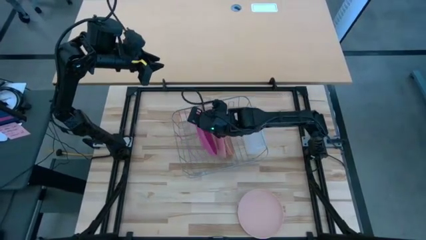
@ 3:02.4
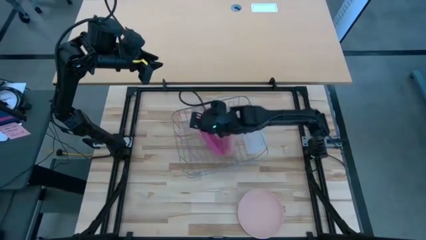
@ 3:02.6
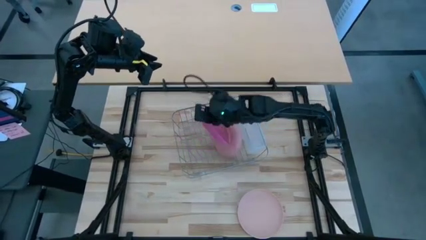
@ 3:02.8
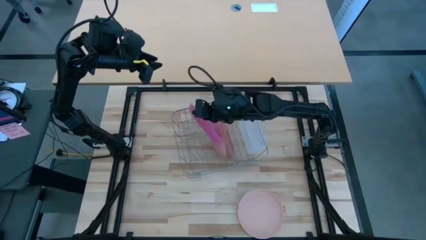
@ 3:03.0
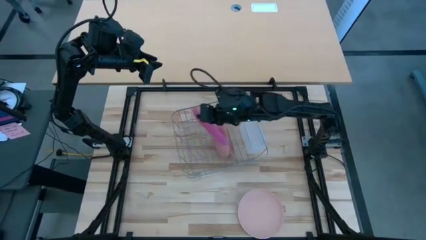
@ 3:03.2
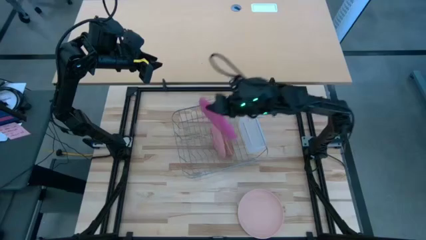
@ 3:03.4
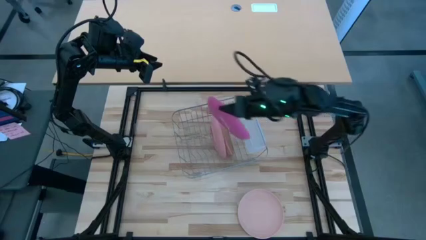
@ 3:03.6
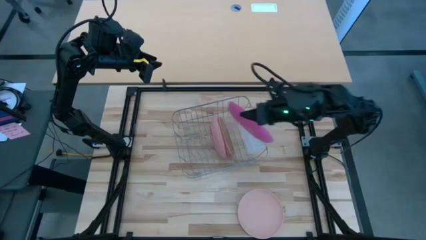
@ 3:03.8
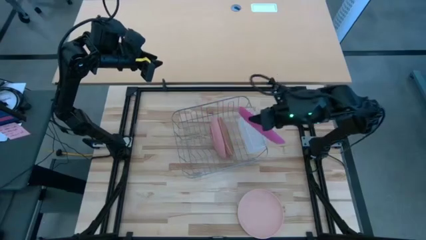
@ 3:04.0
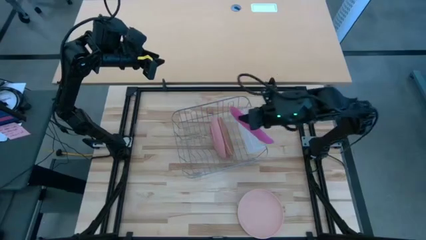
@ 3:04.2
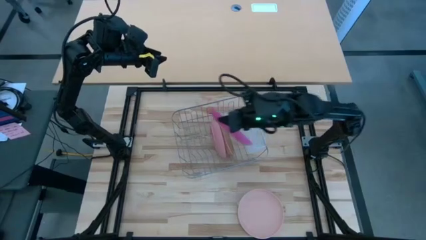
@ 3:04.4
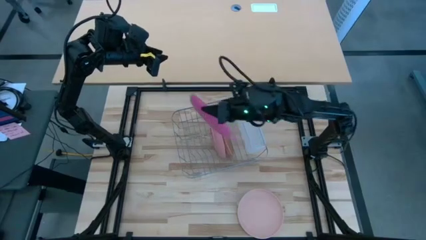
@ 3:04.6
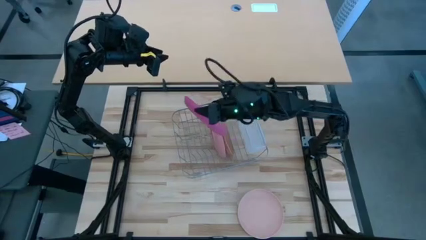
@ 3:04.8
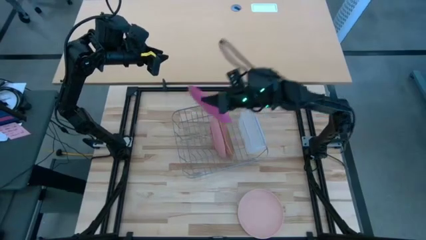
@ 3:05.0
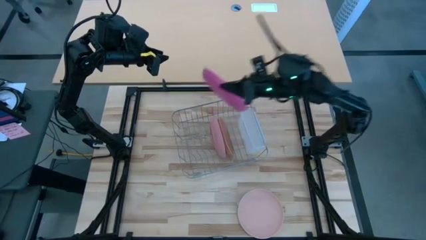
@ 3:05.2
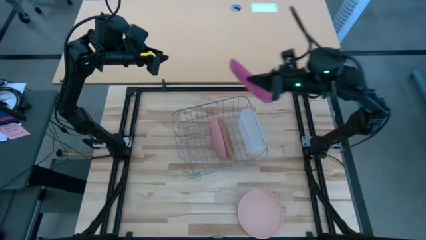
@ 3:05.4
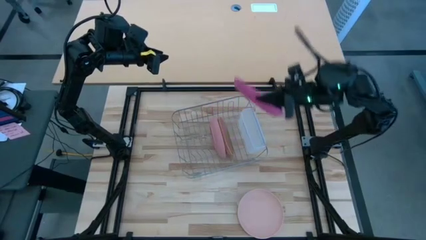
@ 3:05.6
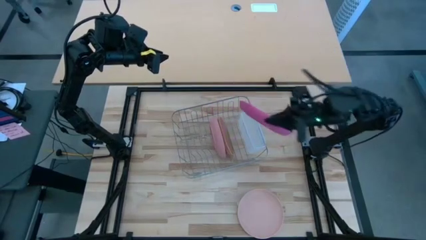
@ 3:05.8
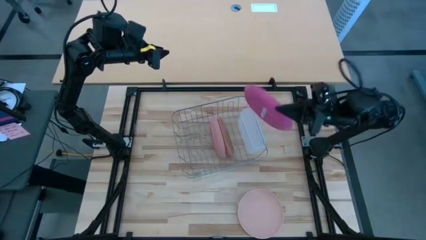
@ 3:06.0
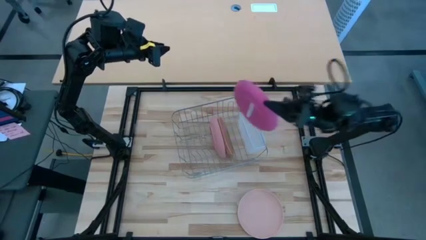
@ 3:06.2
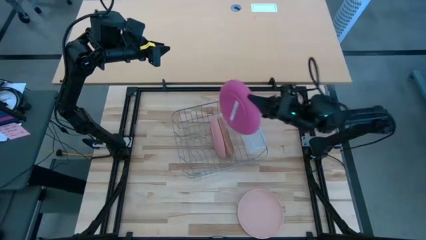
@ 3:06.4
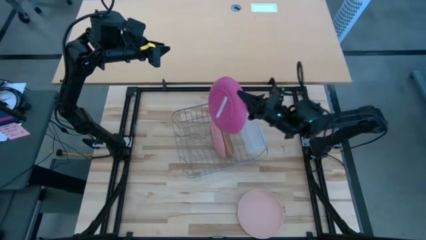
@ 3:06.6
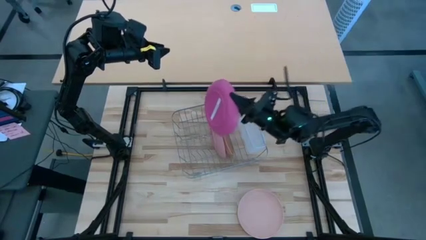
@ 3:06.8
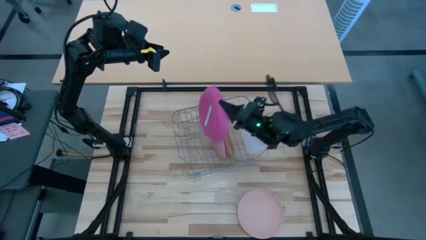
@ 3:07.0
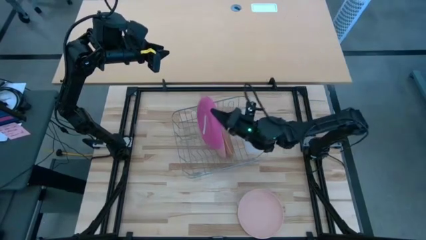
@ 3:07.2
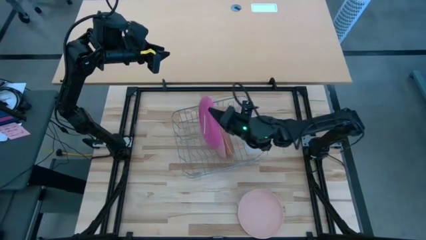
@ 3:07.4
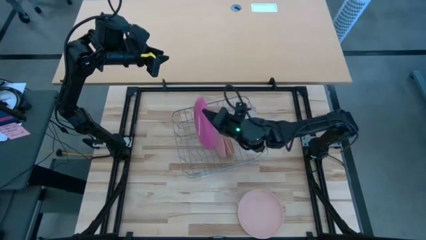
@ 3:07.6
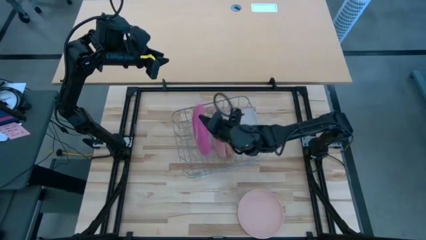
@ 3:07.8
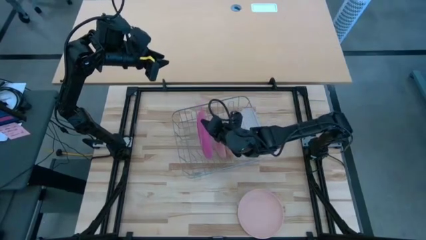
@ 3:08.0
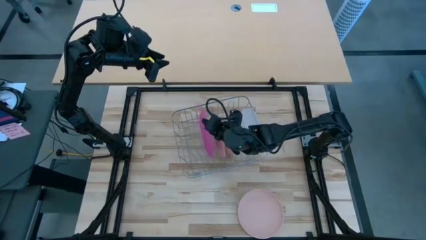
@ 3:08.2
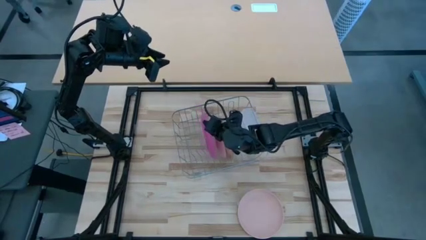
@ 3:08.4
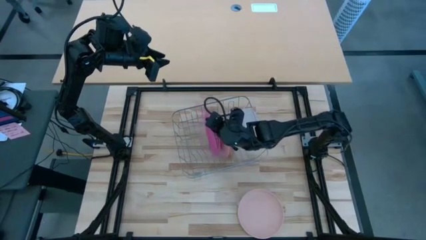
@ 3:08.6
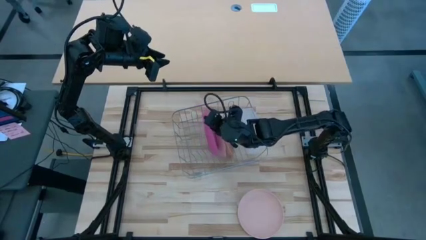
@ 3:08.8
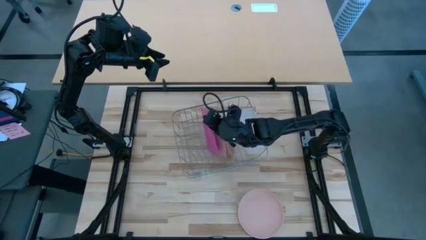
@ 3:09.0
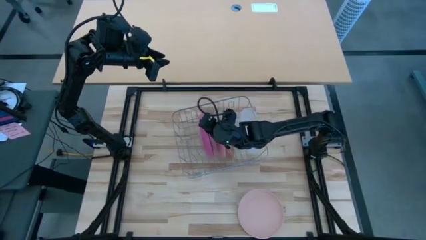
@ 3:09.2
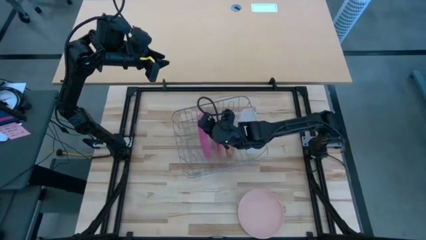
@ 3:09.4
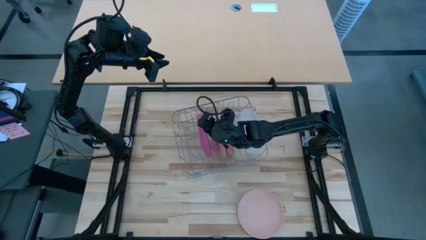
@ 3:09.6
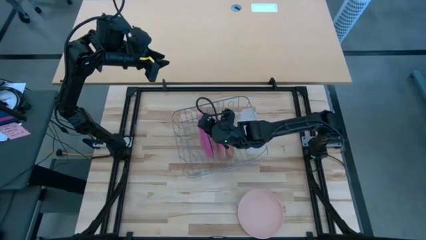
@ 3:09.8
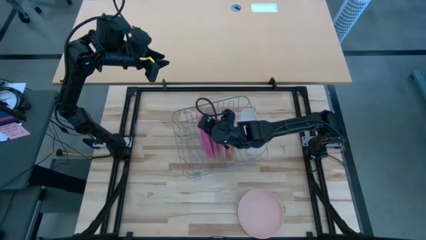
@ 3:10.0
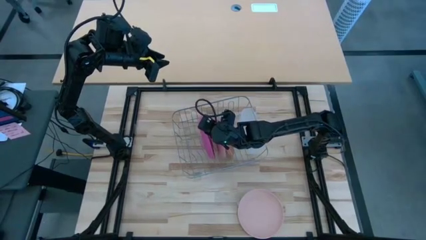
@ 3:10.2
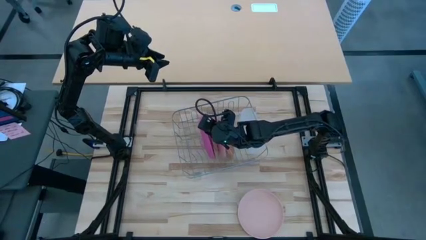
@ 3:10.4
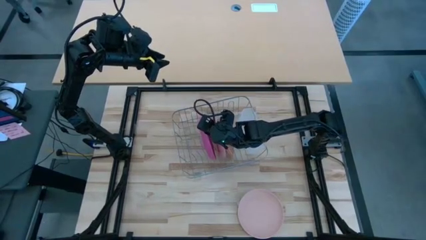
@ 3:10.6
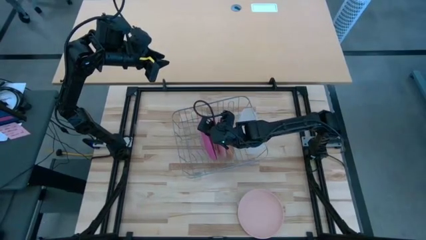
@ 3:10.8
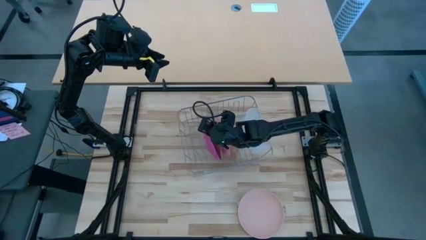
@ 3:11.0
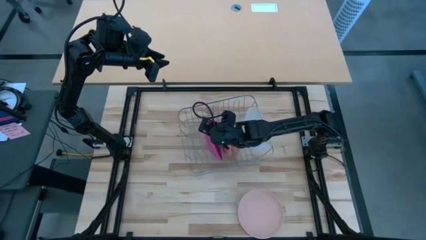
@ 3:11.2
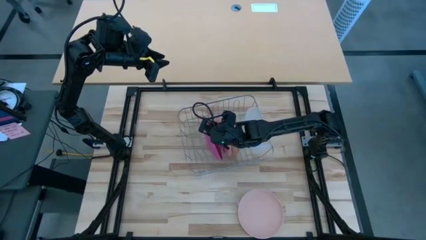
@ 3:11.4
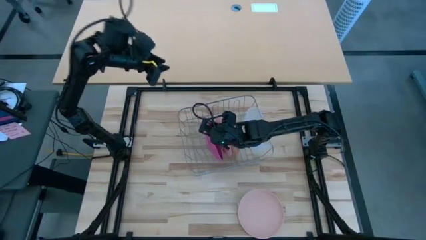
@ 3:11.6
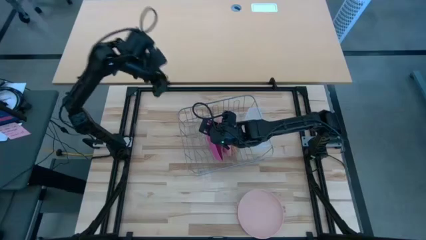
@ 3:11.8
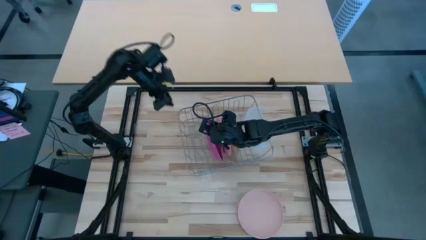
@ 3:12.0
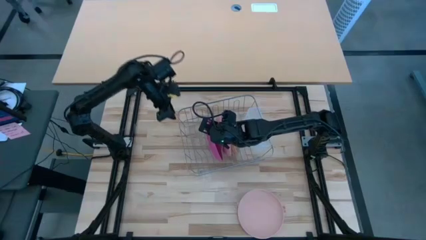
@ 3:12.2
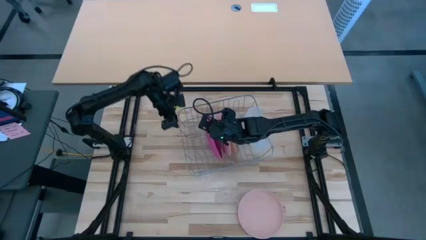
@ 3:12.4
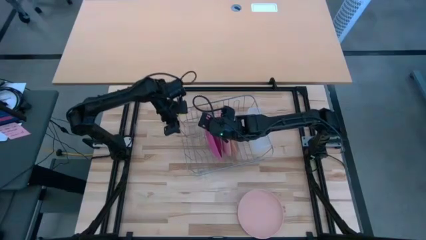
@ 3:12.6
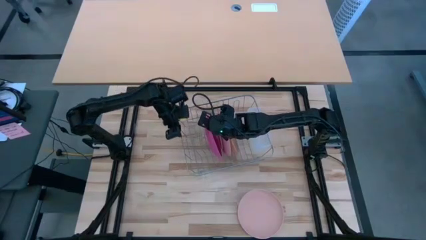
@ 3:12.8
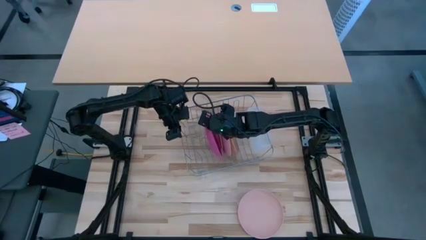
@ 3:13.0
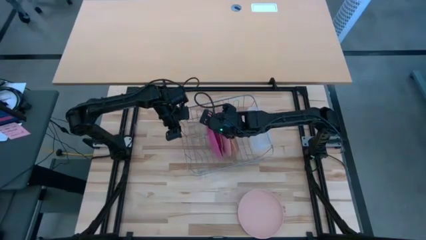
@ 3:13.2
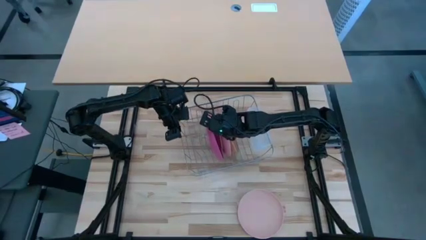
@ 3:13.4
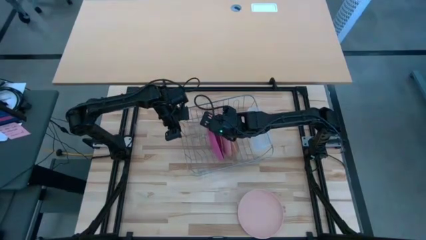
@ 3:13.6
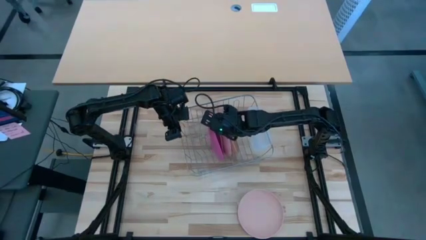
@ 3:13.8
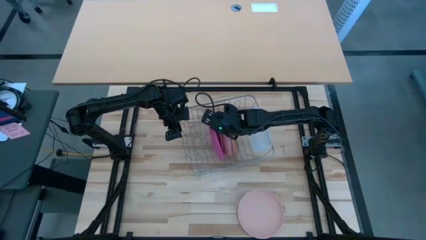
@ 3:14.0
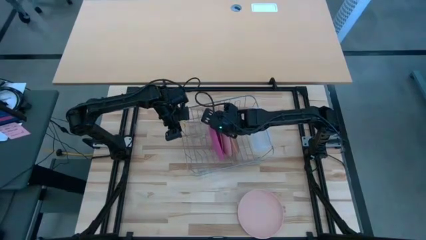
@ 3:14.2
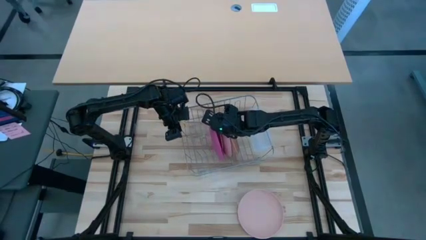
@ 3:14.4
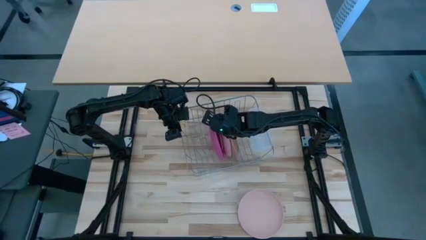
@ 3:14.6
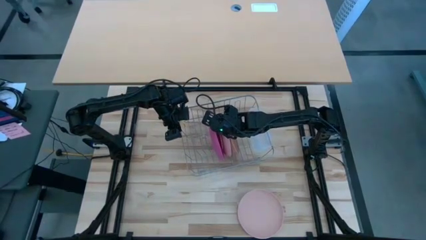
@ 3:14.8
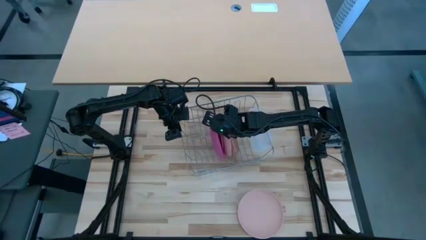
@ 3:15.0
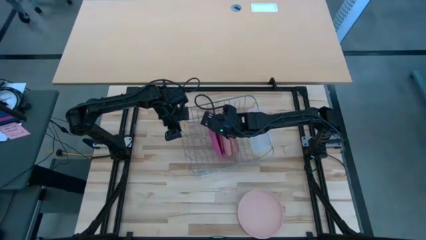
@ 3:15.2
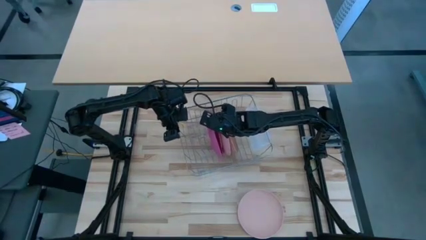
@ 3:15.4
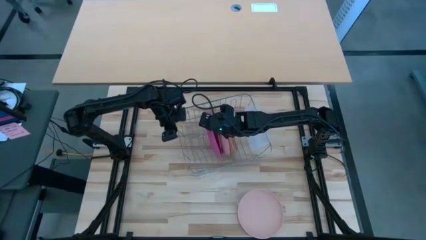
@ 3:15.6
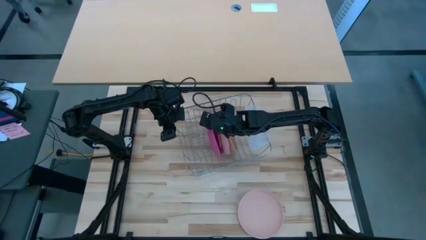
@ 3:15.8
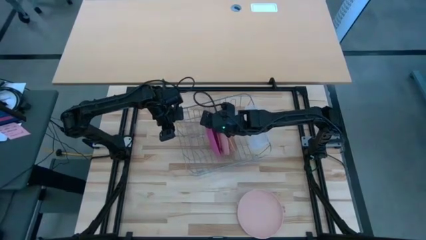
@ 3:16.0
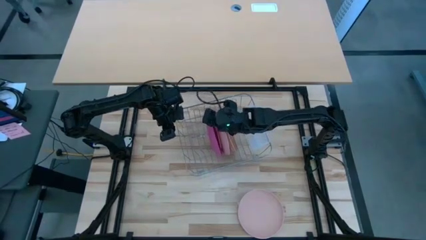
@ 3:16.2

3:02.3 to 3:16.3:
Task: Sort dishes
Put the pink plate in the dish rack
